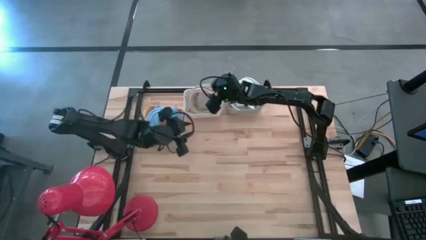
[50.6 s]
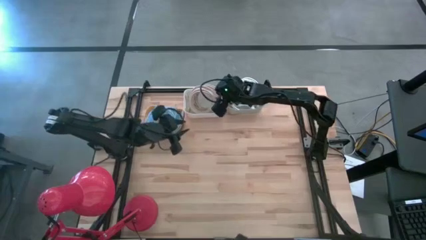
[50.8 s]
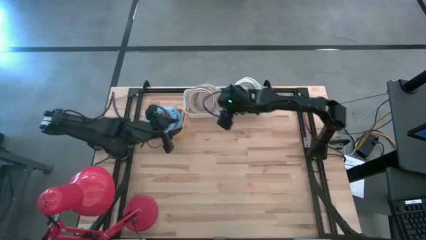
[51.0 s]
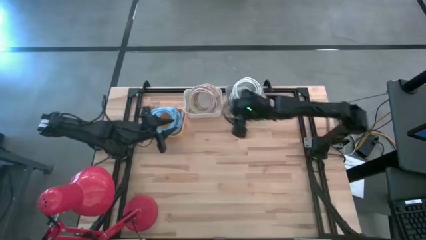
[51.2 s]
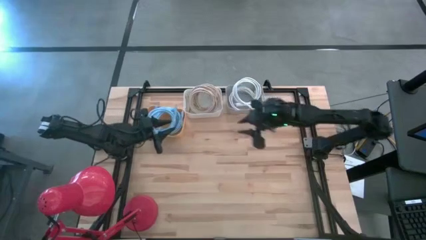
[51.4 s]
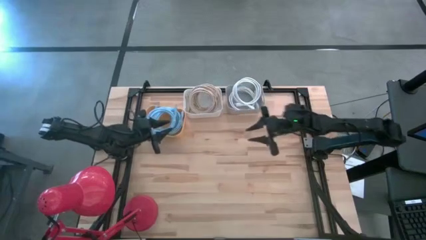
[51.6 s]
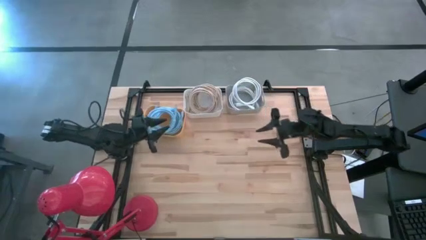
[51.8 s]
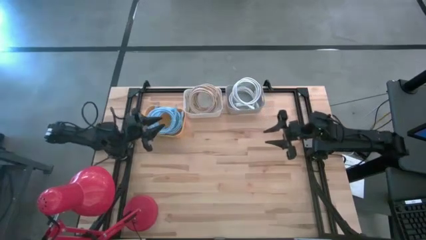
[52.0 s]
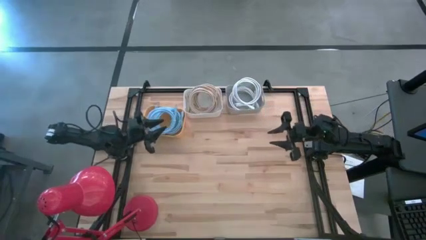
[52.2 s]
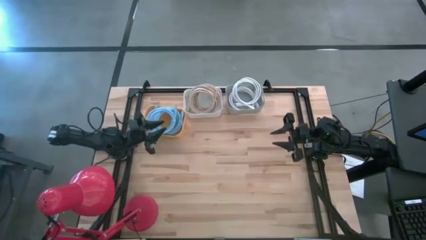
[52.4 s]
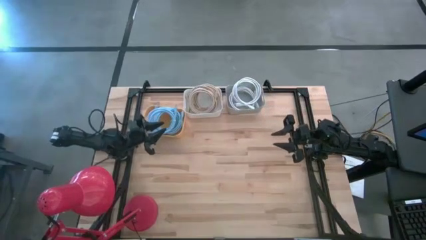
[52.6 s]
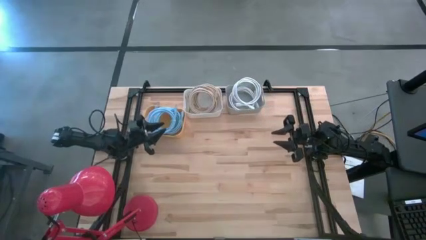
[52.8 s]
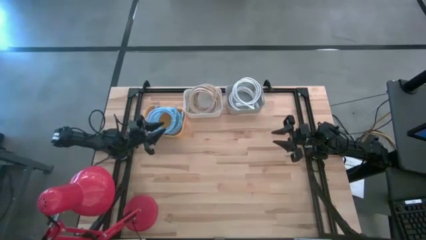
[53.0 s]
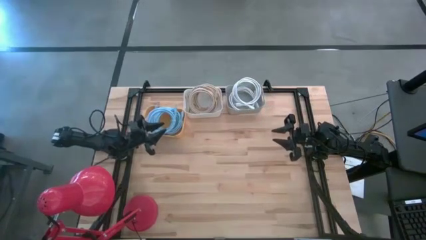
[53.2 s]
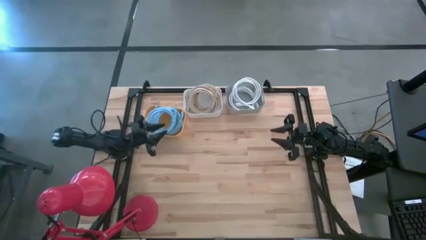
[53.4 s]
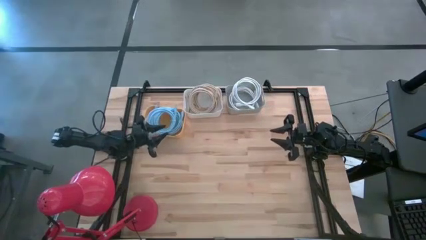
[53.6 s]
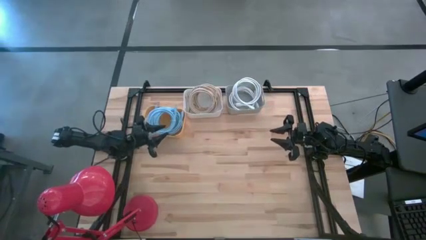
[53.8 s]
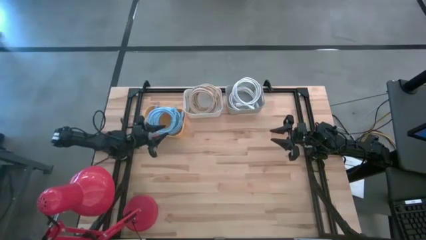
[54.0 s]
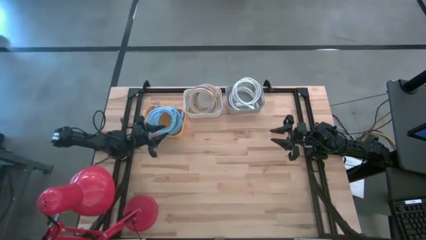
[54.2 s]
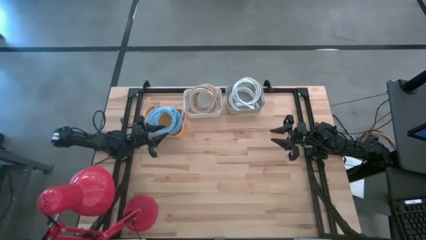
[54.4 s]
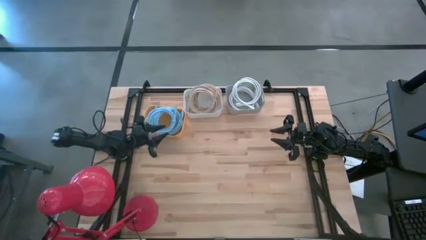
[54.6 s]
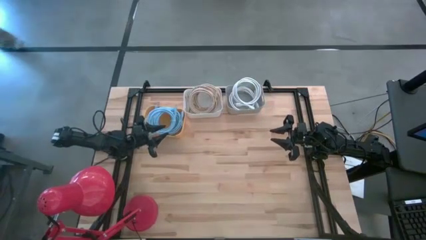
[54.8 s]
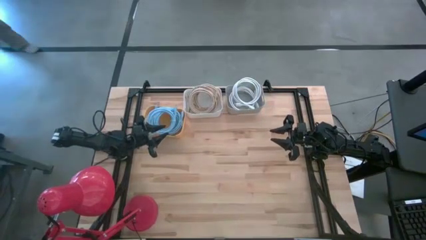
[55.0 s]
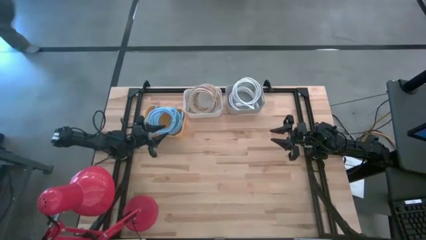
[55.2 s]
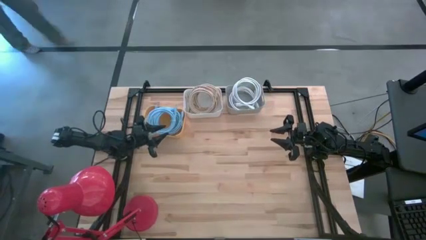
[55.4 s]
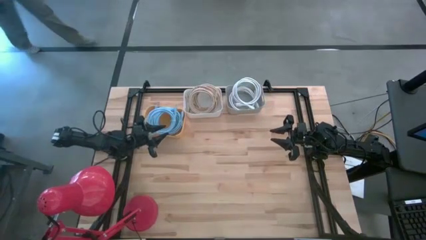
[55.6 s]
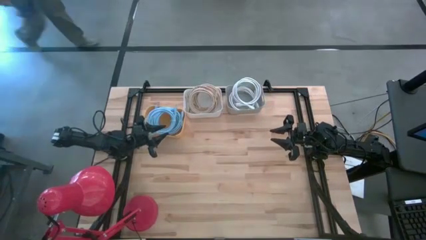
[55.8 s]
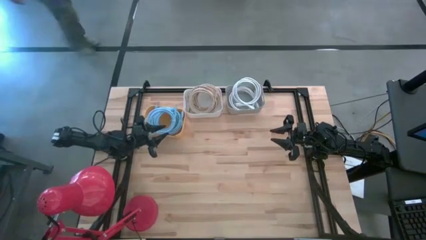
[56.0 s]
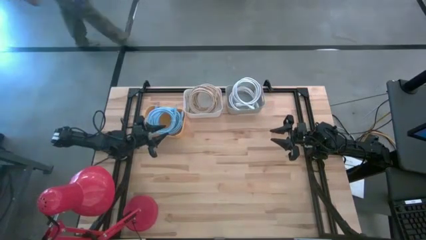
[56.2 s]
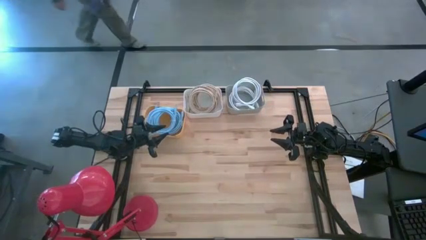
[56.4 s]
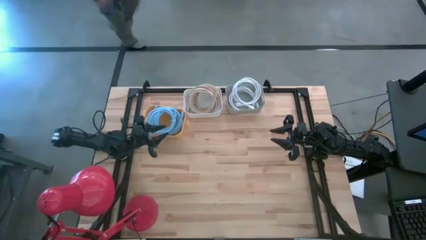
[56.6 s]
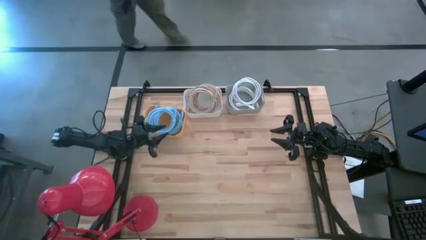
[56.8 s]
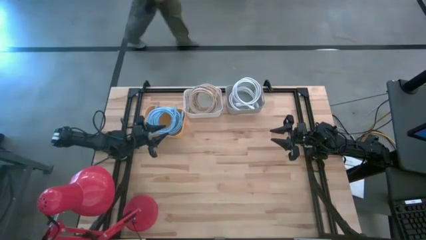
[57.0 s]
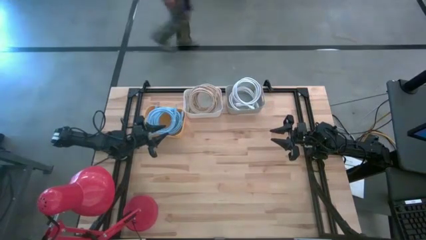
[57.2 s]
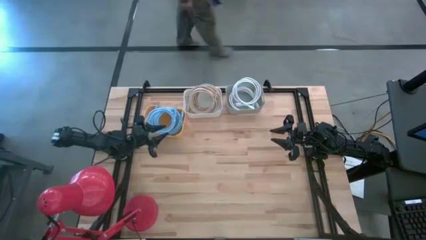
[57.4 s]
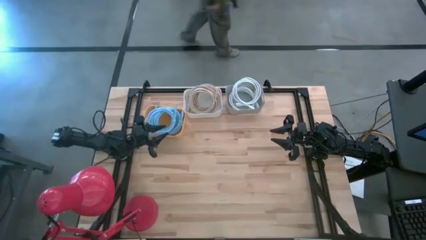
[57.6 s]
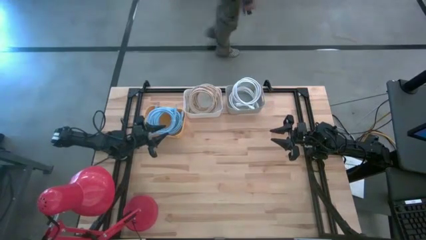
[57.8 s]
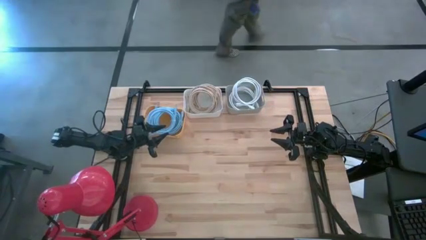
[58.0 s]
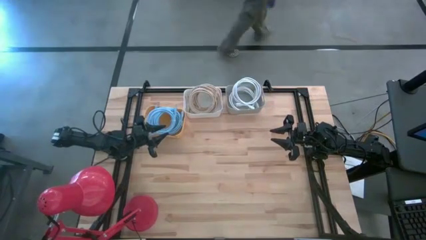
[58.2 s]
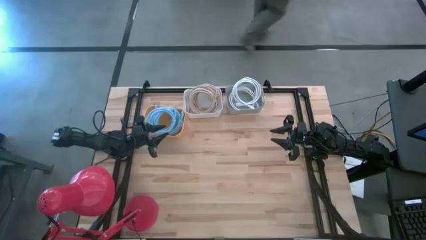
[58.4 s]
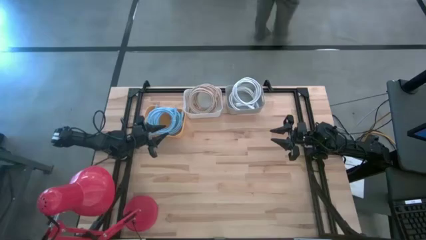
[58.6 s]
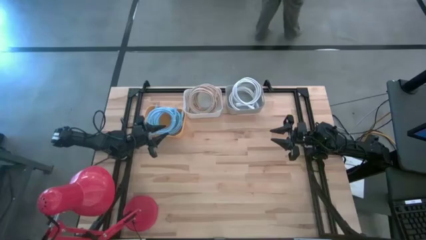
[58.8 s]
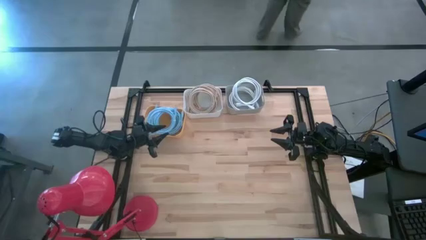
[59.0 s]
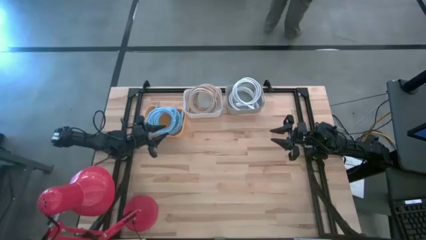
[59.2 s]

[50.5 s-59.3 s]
Task: Sort HDMI cables
Return to Home Position

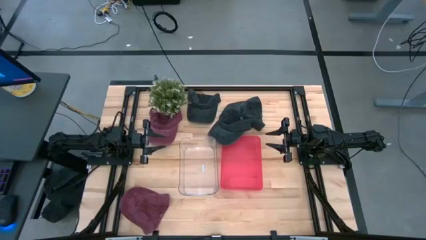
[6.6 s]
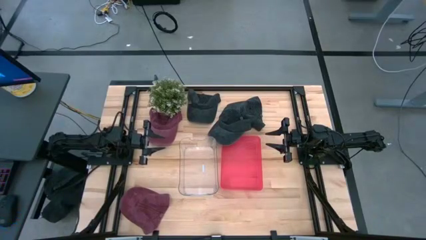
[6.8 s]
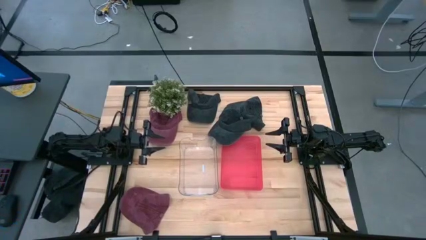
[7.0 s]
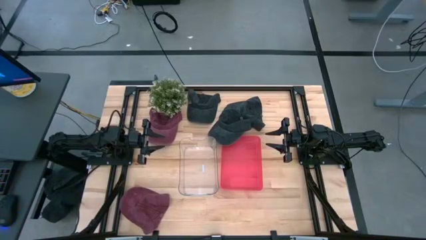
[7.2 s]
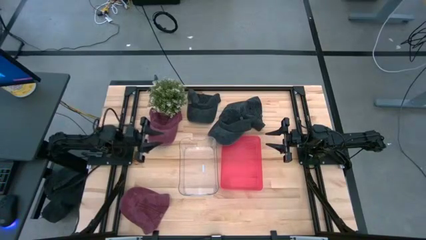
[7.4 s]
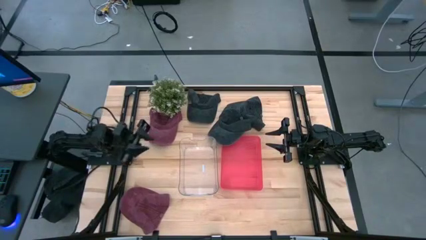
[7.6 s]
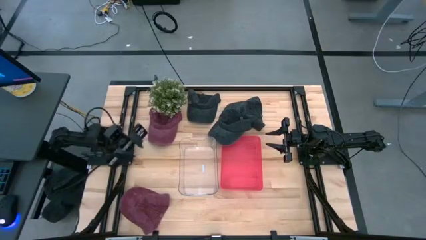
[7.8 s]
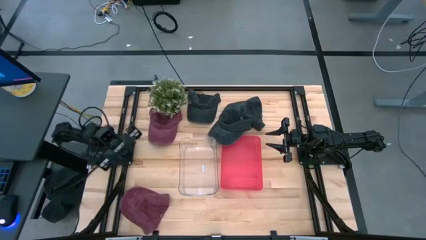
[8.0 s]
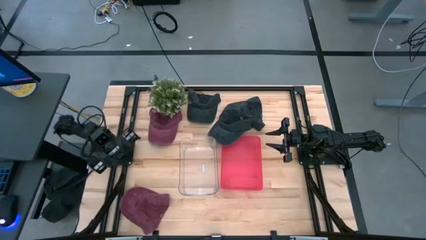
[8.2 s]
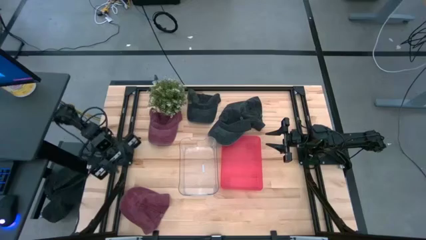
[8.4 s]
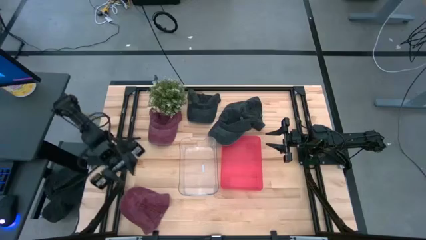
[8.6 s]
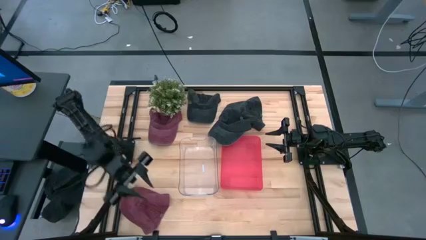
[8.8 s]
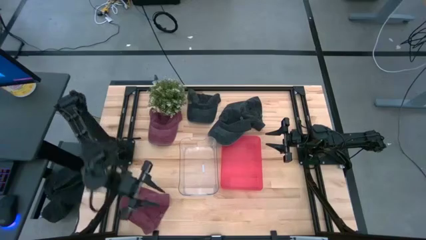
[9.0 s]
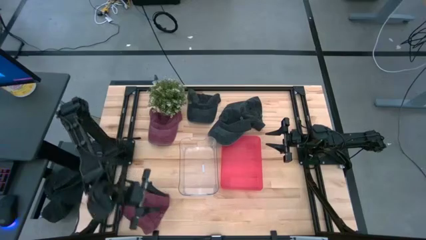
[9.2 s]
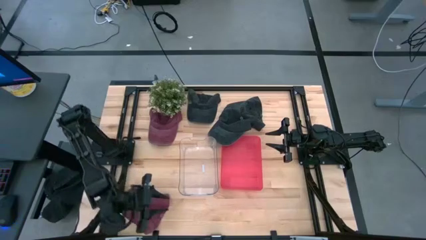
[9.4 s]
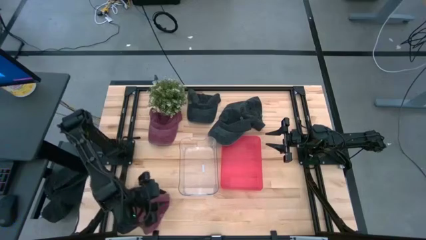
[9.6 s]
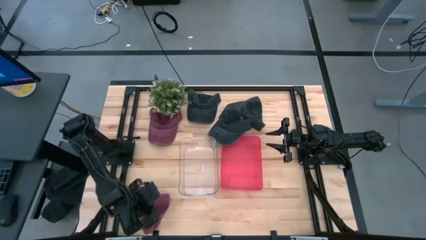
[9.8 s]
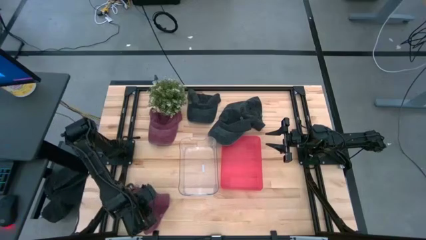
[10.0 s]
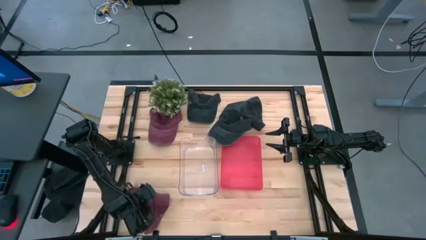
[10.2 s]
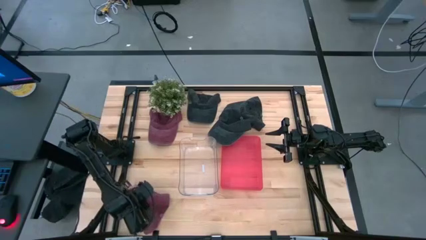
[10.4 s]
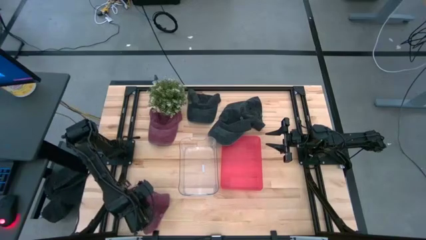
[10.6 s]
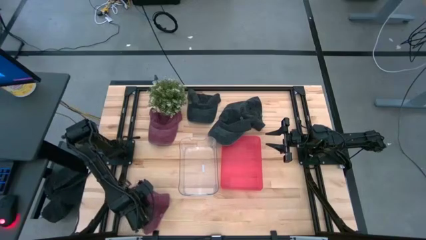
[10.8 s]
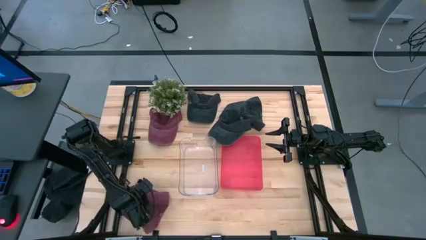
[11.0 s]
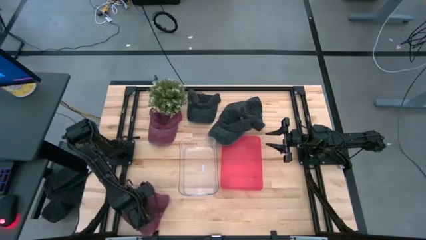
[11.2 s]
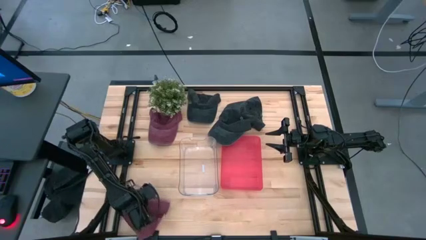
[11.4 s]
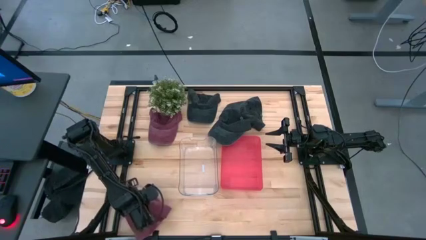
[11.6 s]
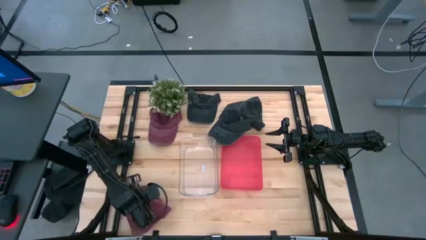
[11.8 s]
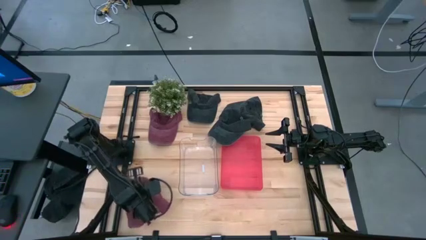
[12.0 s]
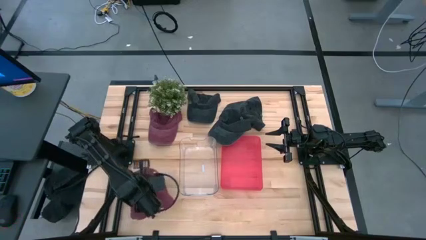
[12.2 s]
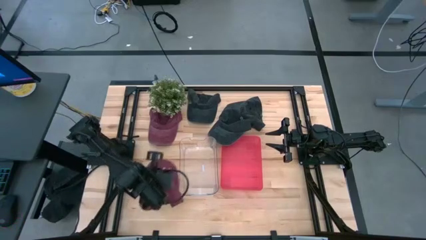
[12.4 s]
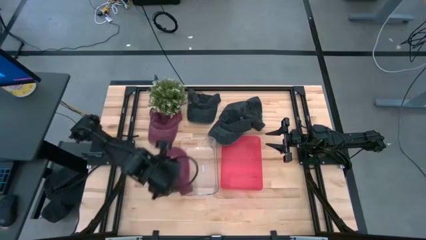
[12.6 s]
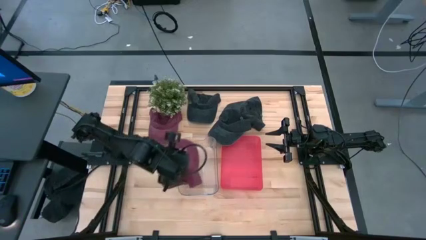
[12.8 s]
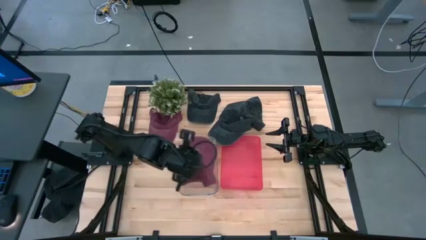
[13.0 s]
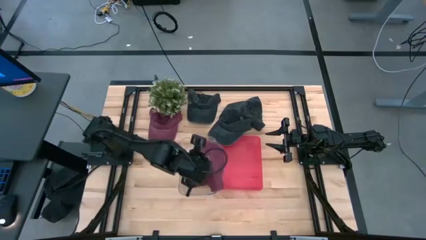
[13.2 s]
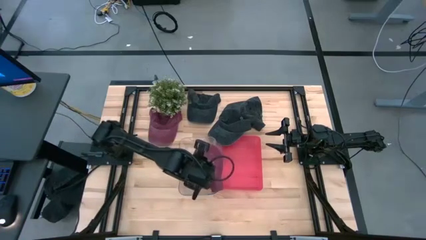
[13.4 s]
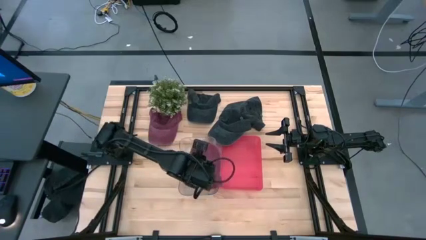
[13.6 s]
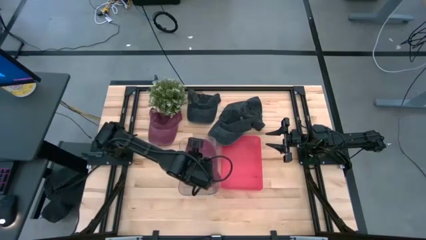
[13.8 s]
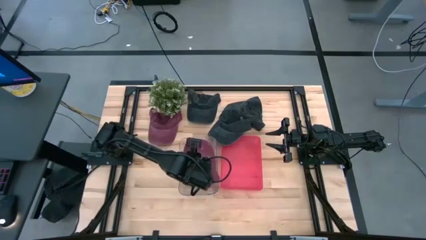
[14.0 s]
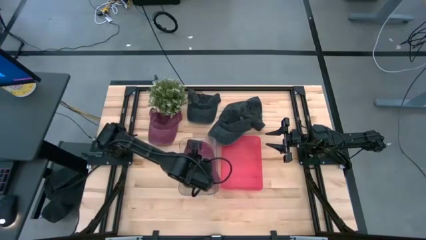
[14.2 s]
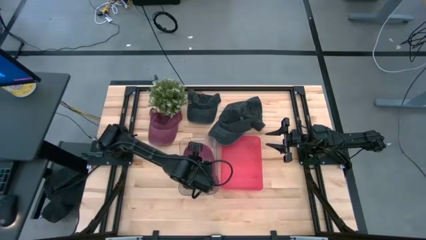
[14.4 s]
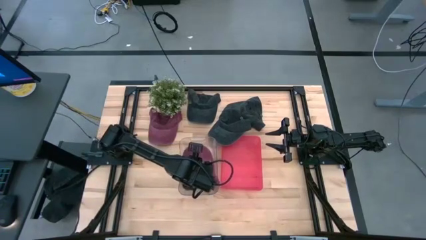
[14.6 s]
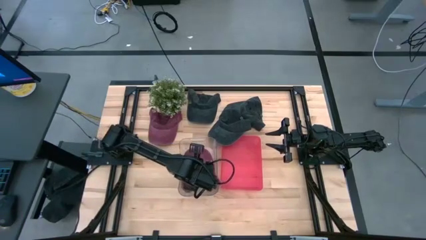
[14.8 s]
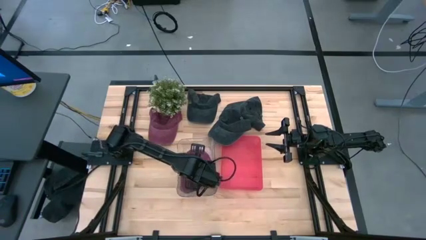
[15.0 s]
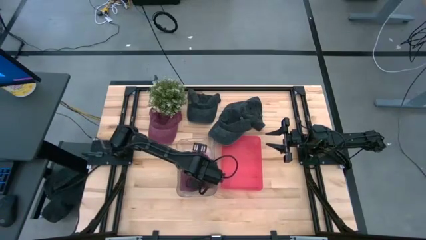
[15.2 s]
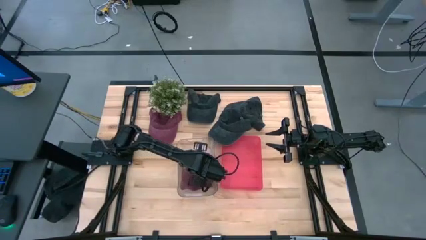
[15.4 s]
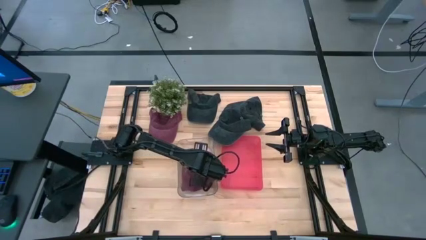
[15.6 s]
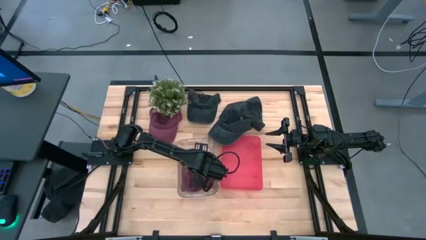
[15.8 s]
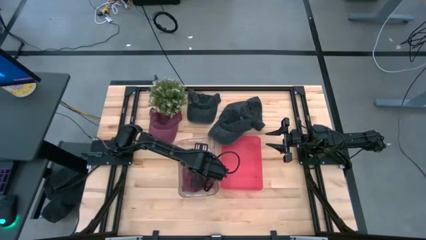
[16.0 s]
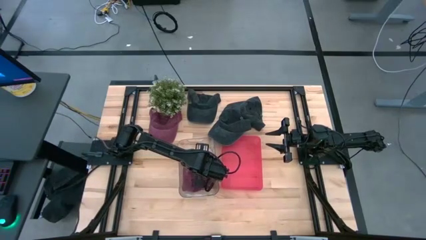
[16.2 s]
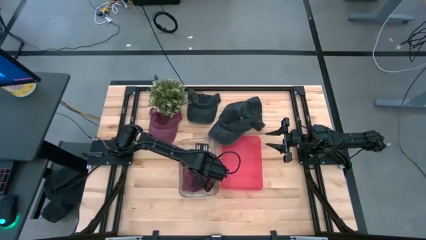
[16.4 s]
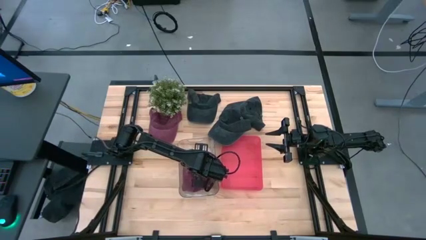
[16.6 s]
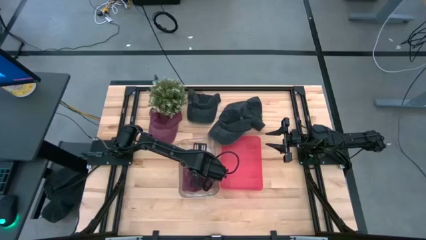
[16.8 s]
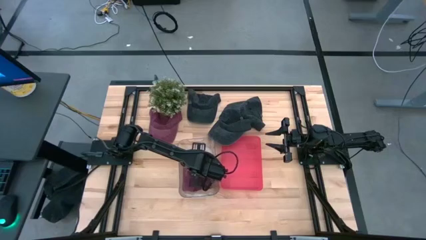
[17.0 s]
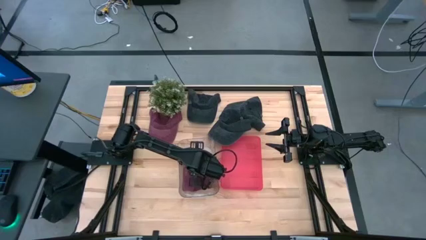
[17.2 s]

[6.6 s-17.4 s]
Task: Pick & Place hat
Put the bottom red cap into the transparent bin
